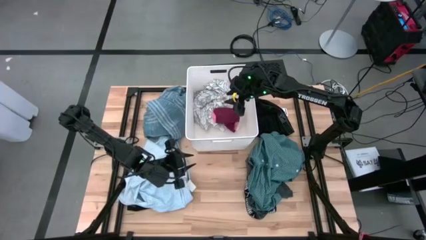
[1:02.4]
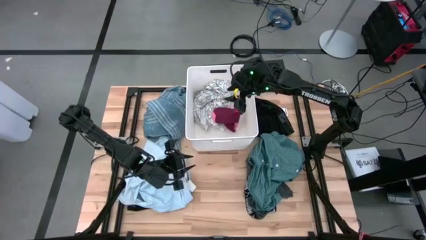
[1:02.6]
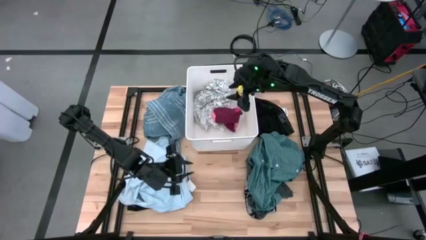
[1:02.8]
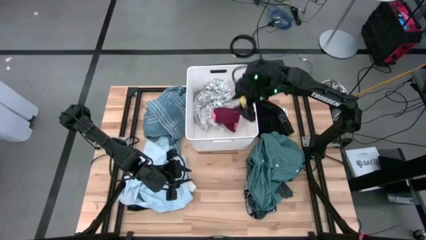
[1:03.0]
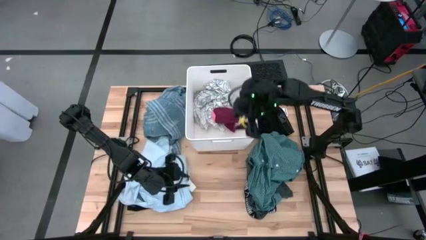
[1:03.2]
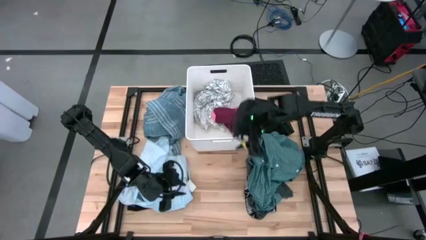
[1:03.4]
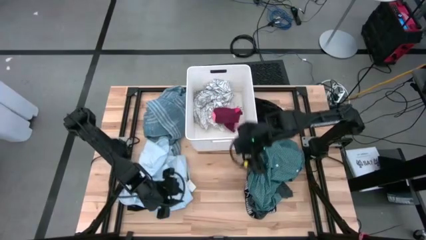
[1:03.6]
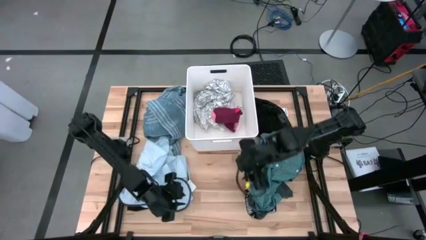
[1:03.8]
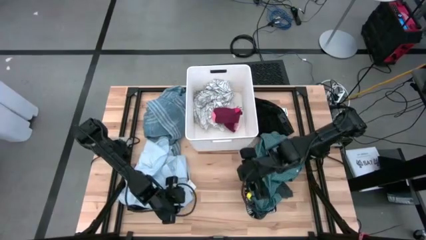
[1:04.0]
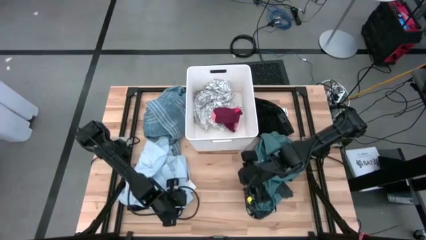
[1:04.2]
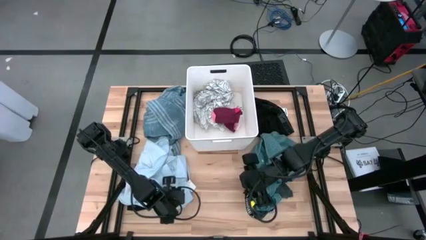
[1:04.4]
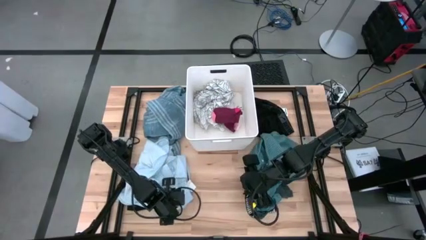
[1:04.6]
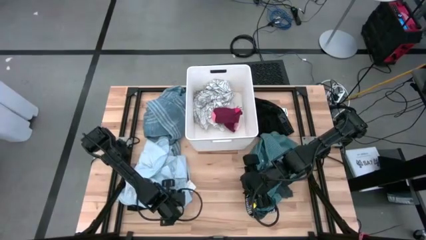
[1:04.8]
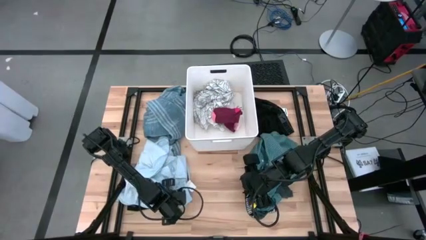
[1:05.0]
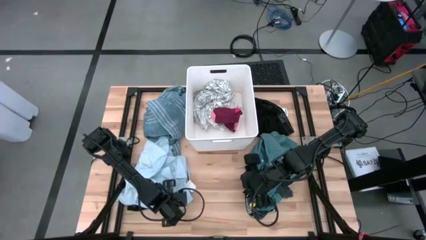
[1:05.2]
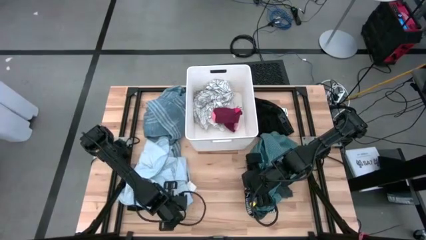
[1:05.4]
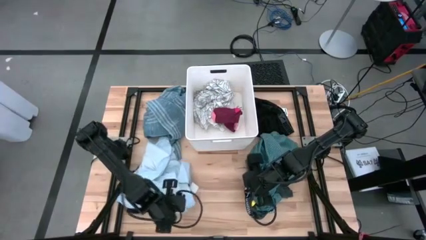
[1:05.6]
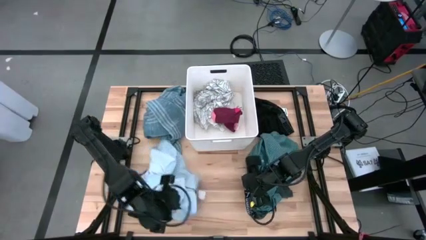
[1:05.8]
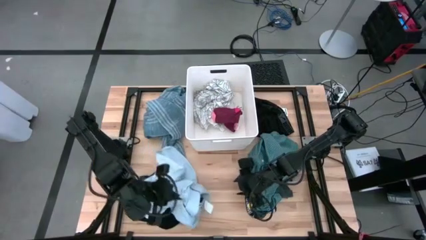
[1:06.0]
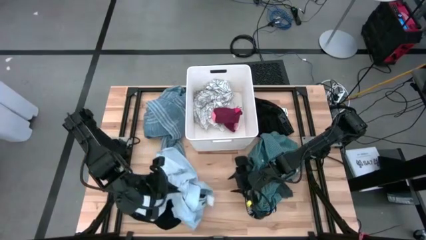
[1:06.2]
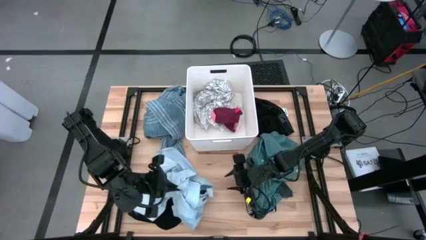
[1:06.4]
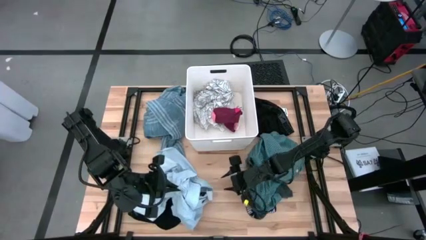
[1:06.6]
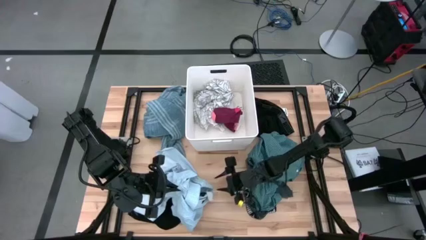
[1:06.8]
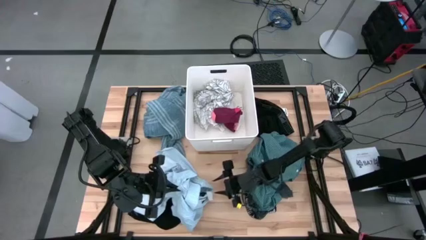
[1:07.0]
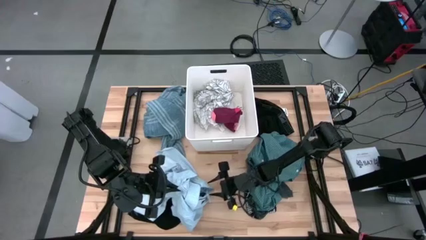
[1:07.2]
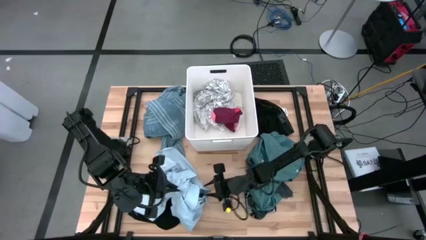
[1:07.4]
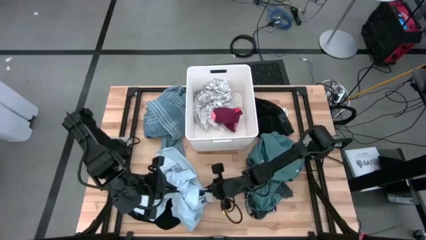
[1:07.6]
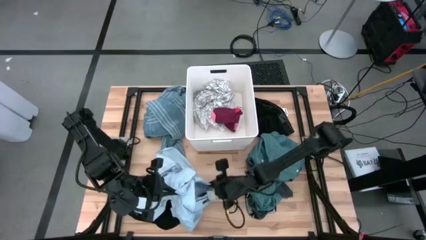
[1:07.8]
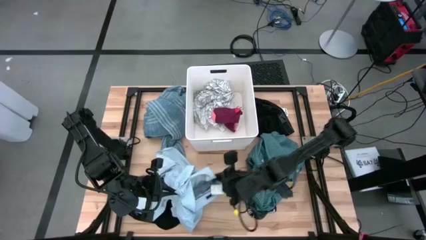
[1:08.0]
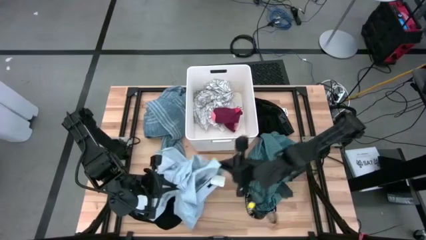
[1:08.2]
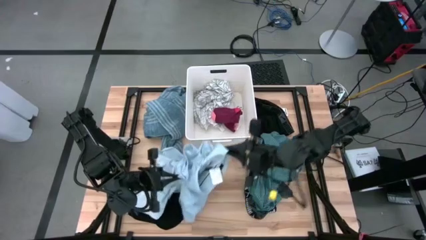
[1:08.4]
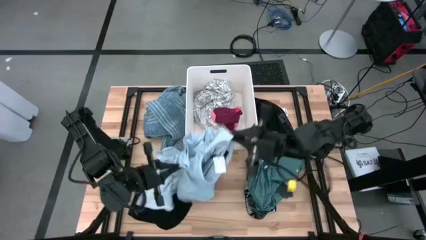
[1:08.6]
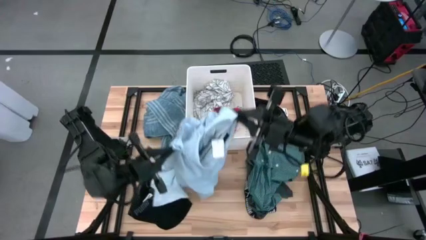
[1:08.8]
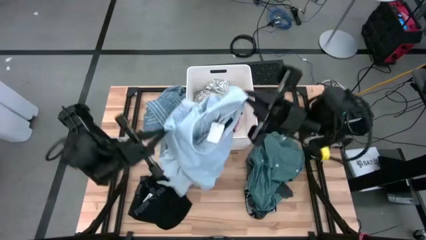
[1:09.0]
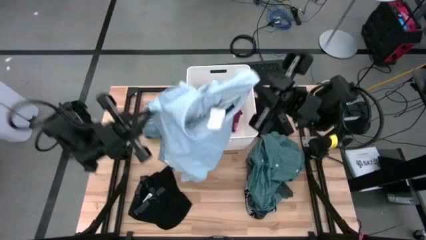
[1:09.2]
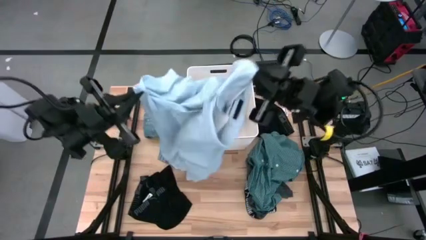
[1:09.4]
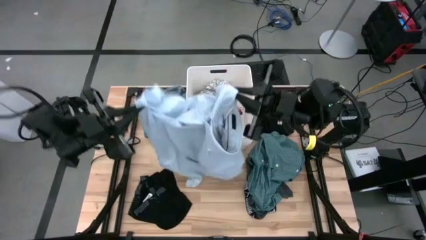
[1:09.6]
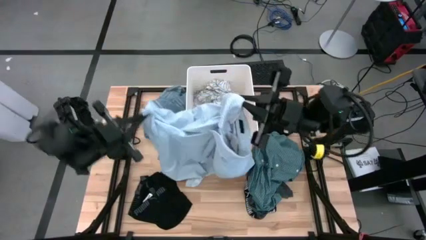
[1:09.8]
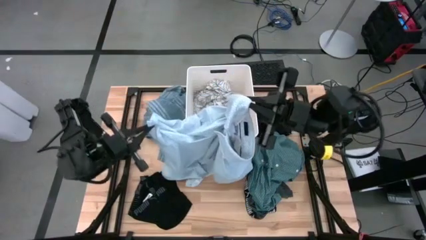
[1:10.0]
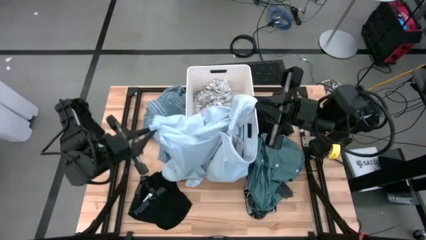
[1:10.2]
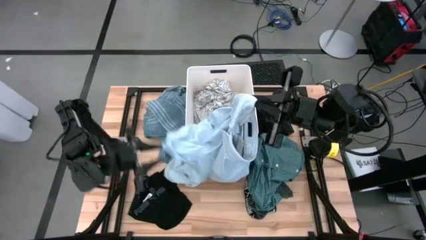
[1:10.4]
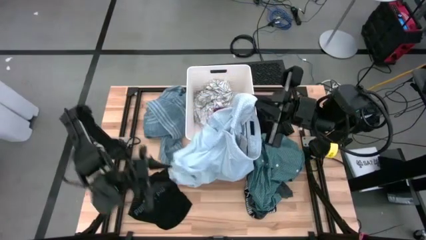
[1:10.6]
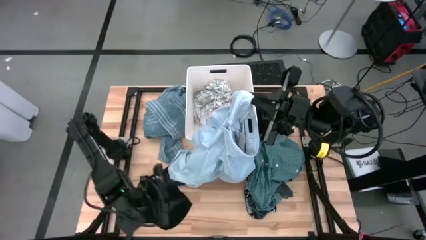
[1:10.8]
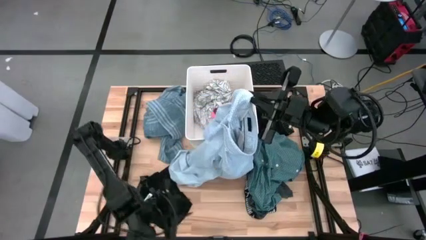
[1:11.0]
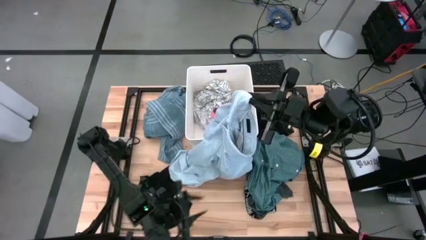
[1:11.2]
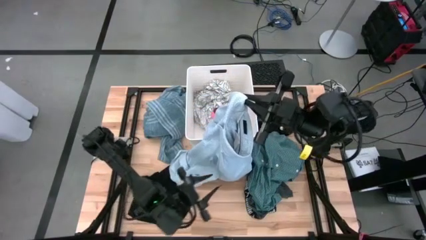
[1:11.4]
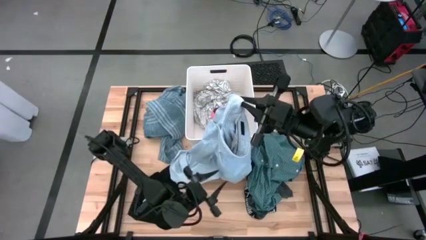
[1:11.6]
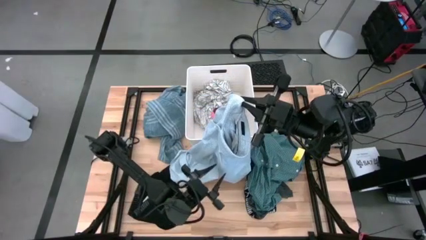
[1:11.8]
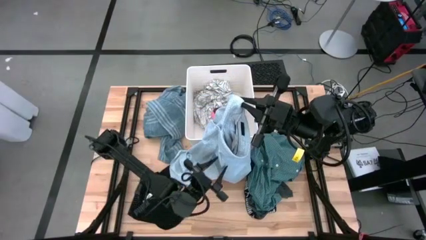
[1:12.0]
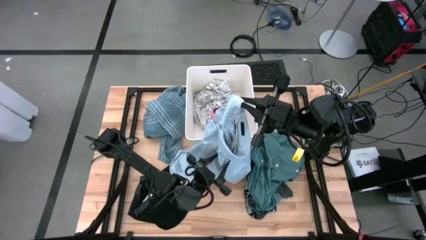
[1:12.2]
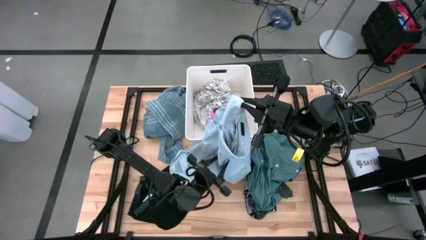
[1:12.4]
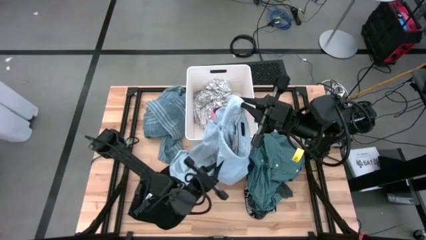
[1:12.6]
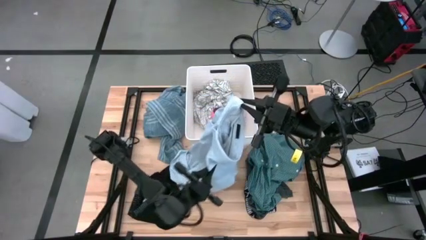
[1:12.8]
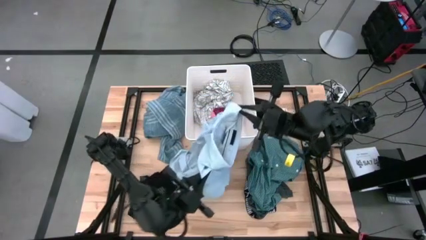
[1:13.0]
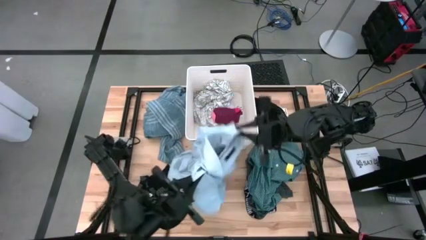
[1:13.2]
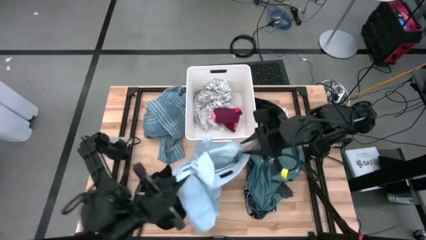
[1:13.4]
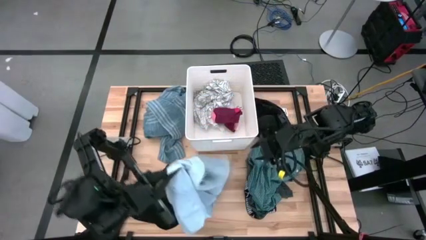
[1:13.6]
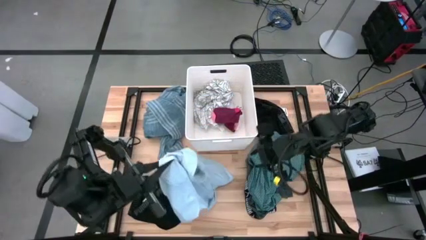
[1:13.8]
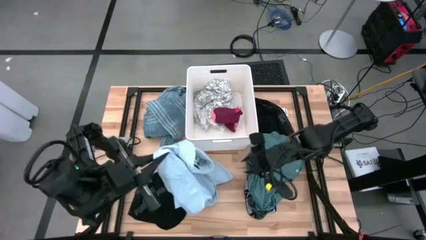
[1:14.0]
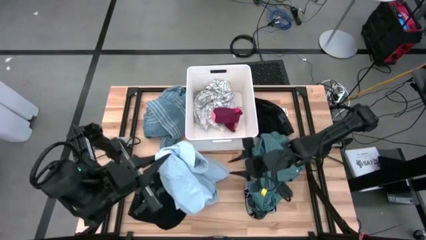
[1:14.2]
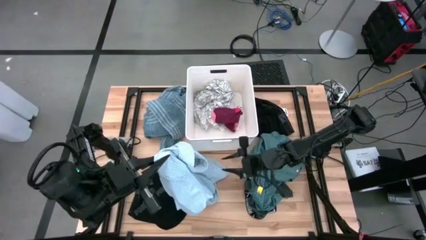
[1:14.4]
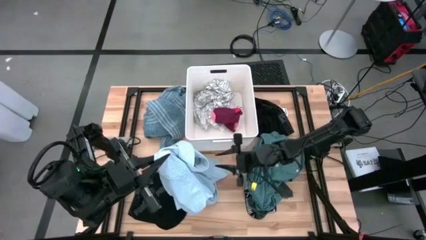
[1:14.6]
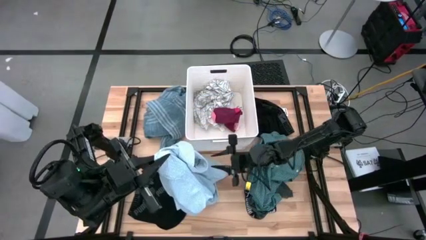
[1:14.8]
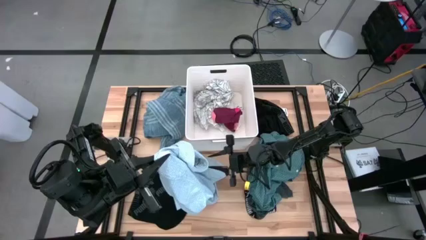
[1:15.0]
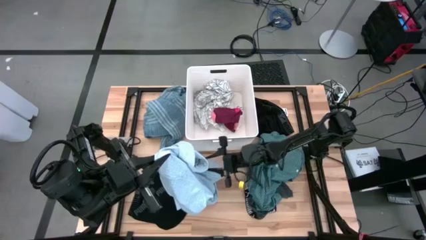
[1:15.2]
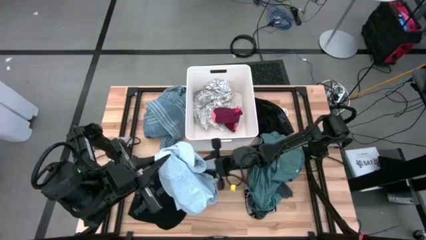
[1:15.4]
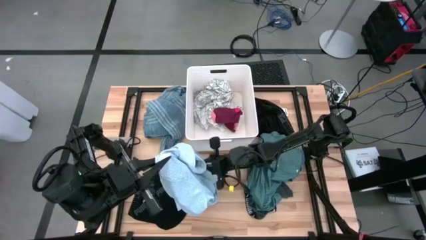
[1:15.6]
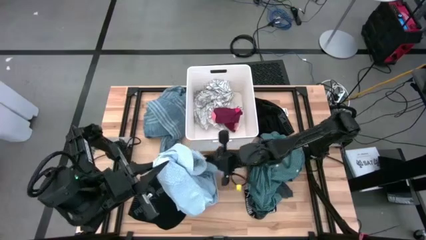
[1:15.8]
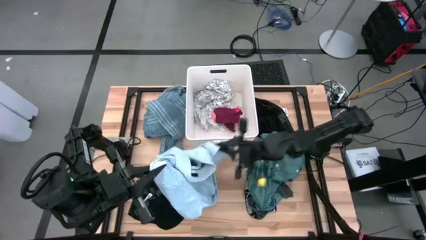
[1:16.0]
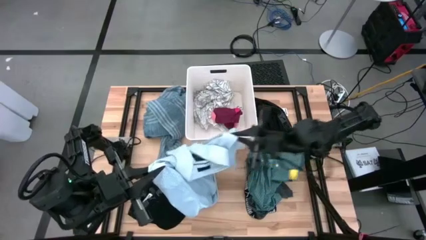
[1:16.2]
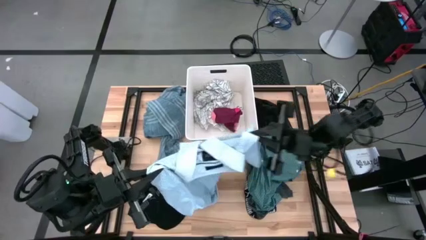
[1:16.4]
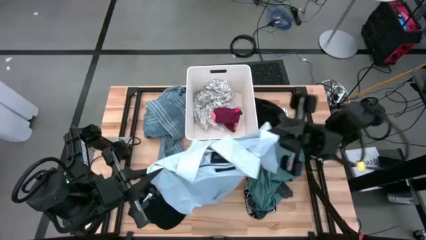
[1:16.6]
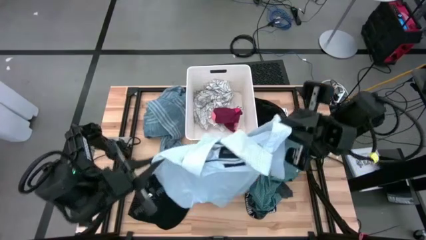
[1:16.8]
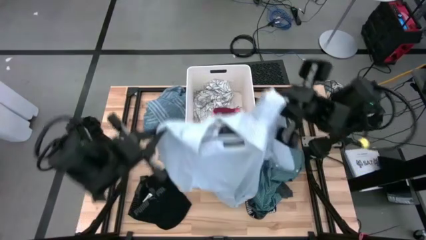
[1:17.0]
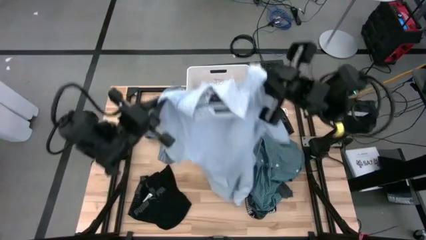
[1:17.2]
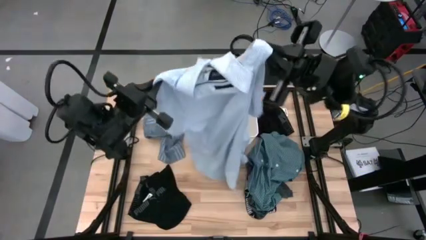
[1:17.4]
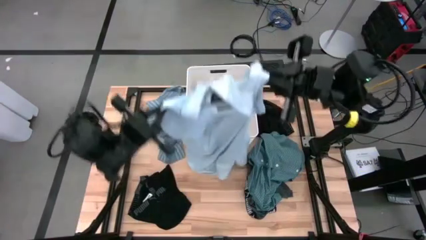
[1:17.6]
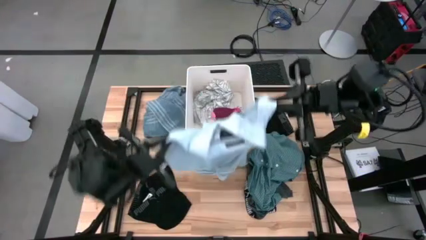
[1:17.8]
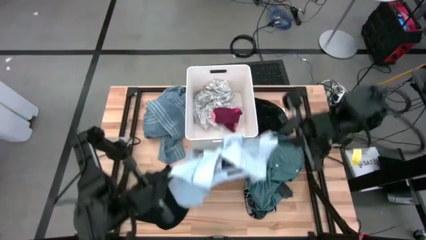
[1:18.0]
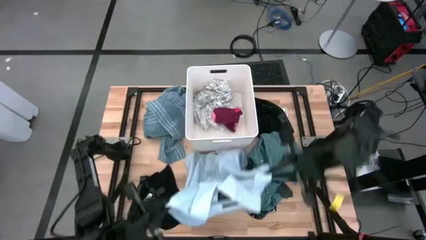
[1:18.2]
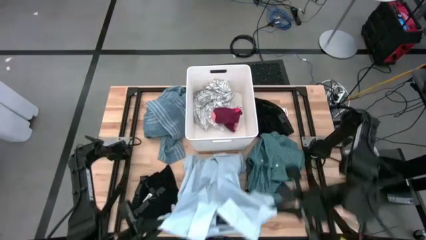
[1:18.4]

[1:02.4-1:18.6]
Task: Sort clothes
Put the light blue shirt into the white bin
